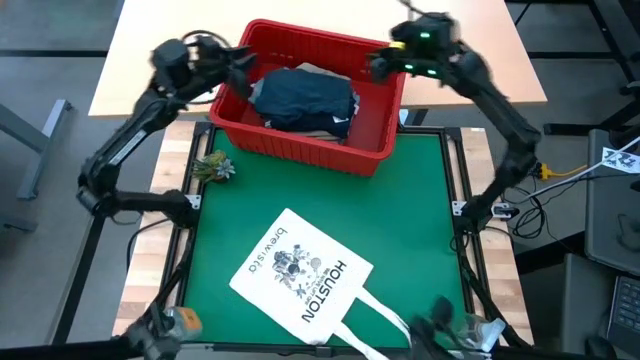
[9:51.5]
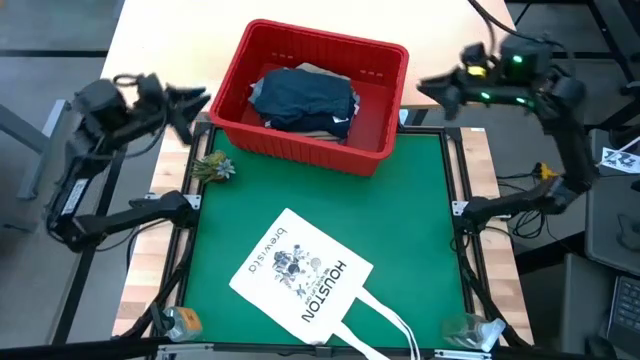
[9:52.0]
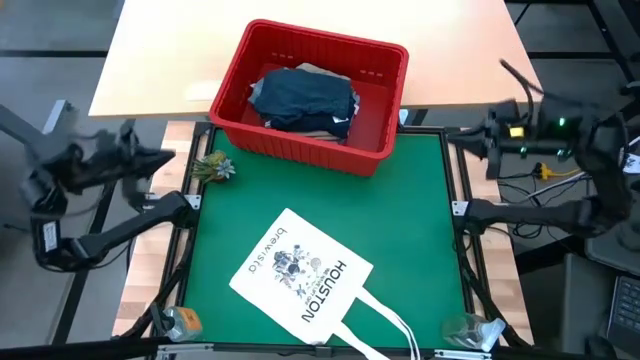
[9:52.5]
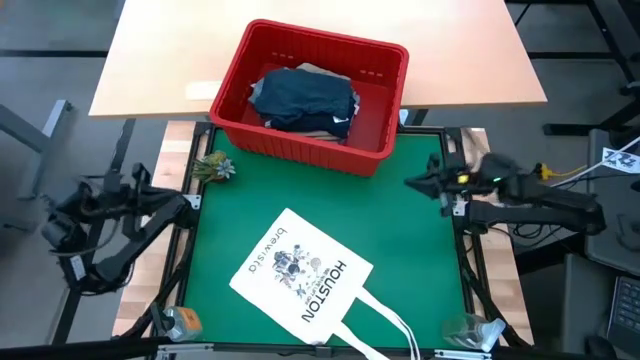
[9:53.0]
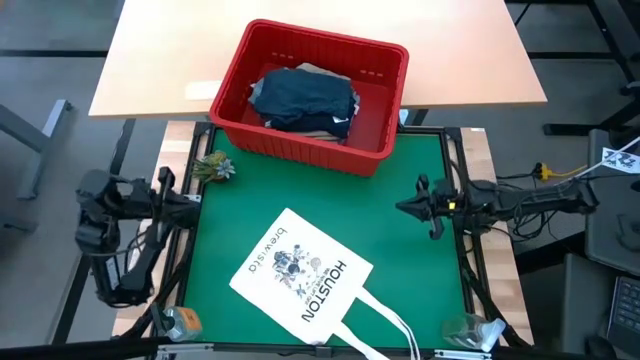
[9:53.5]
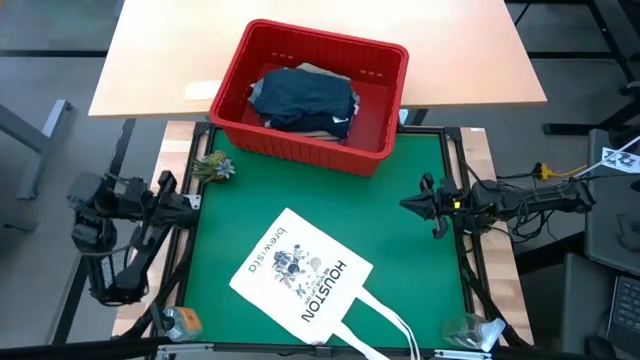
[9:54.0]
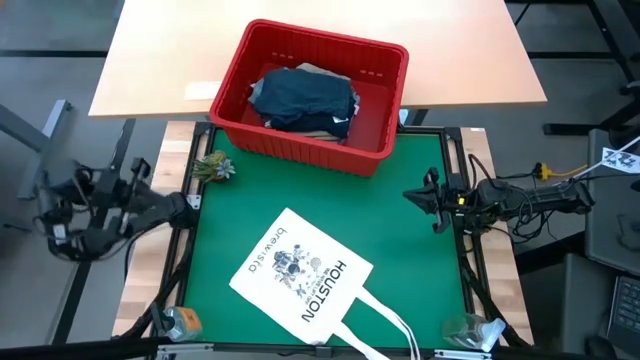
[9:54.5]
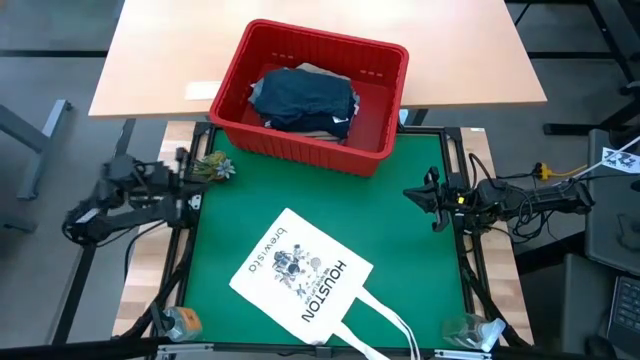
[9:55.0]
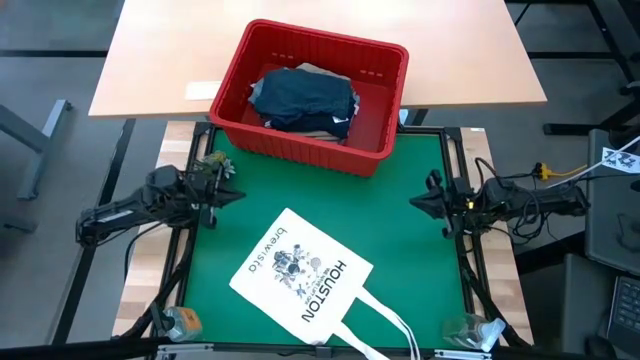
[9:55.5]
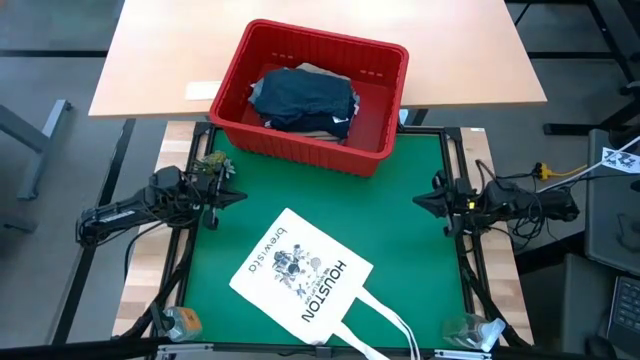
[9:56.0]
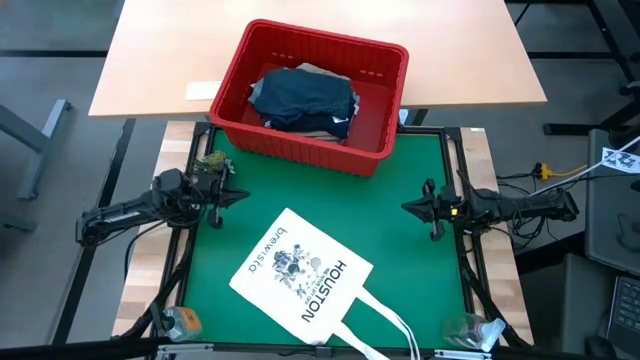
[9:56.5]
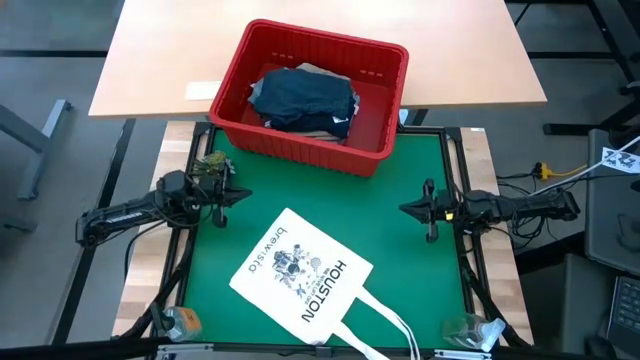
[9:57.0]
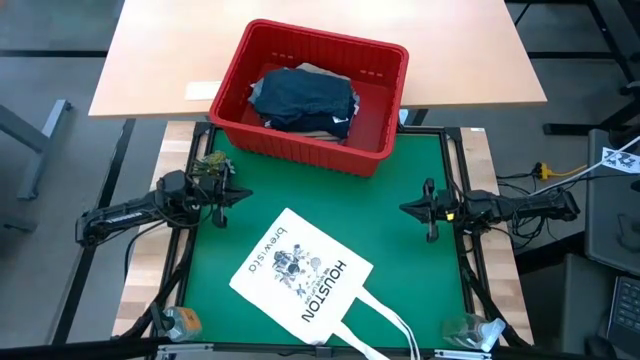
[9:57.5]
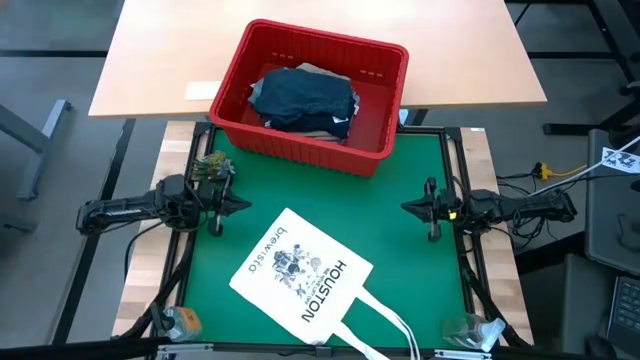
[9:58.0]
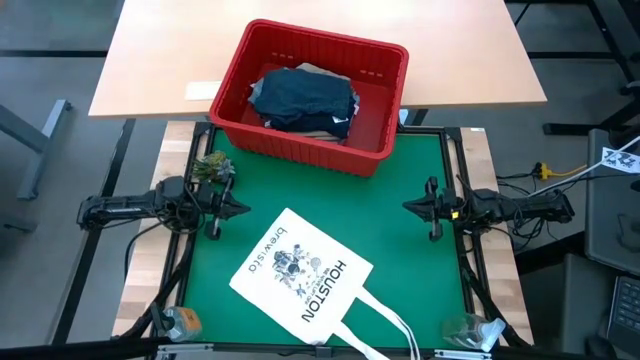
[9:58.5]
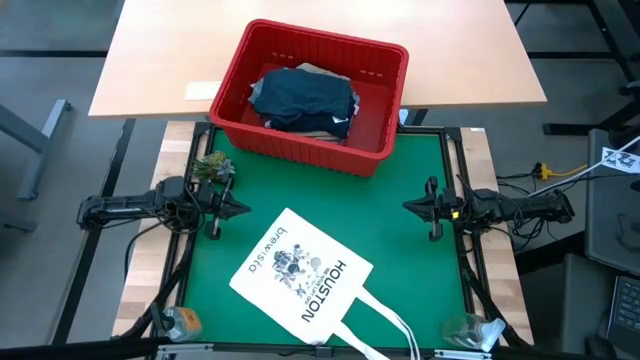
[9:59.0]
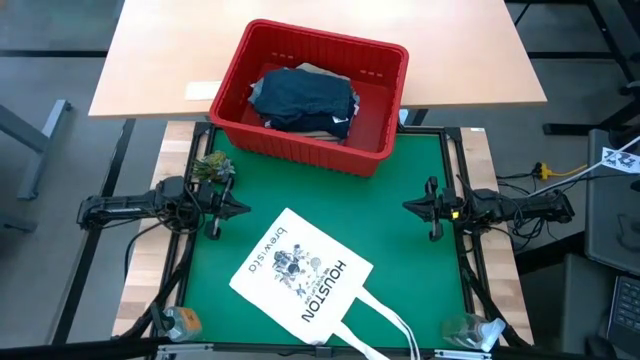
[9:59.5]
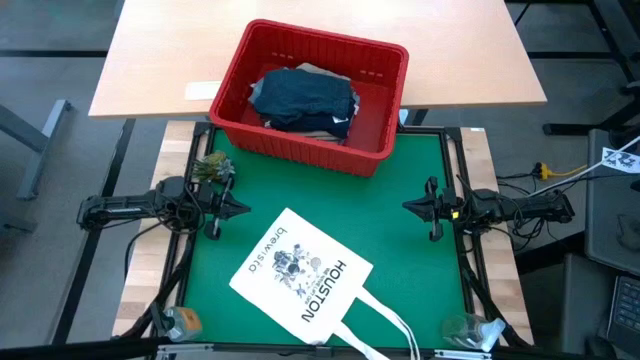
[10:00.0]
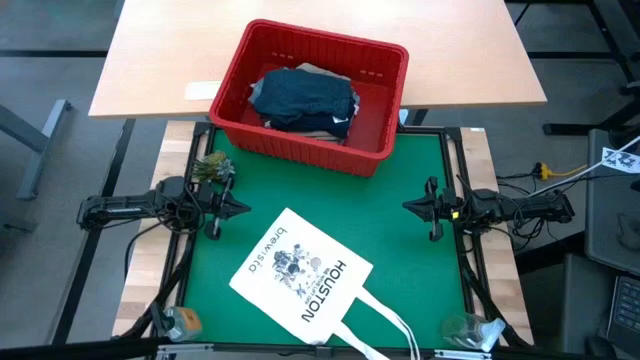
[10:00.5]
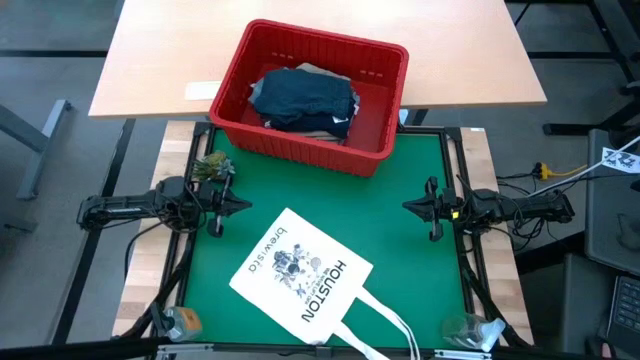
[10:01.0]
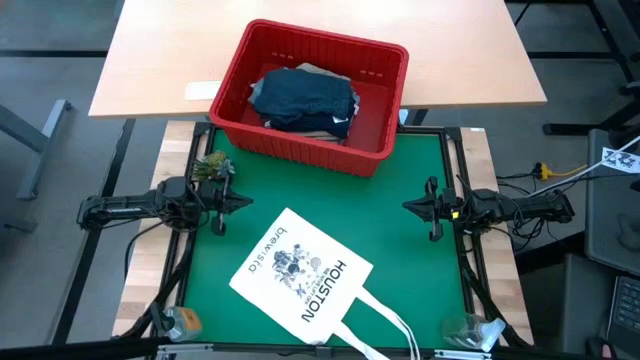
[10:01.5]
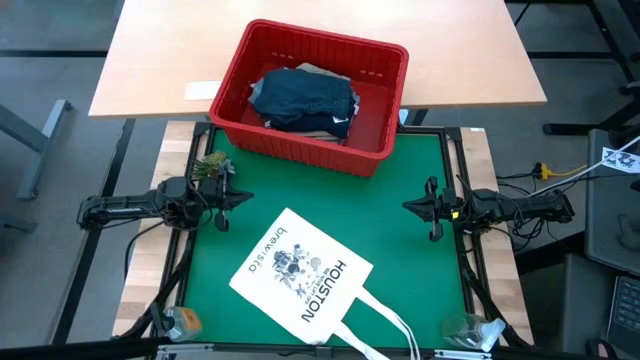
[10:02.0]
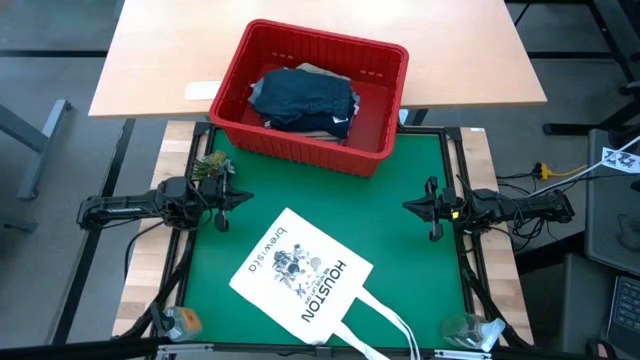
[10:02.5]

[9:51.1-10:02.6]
Task: Fold Laundry from Bin
Return to Home Position

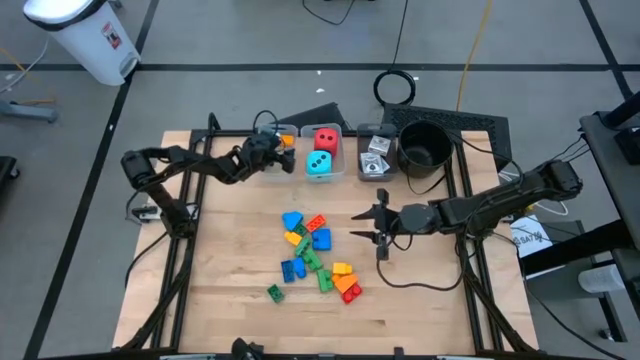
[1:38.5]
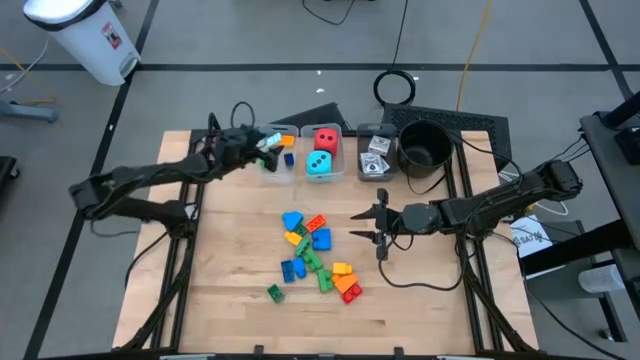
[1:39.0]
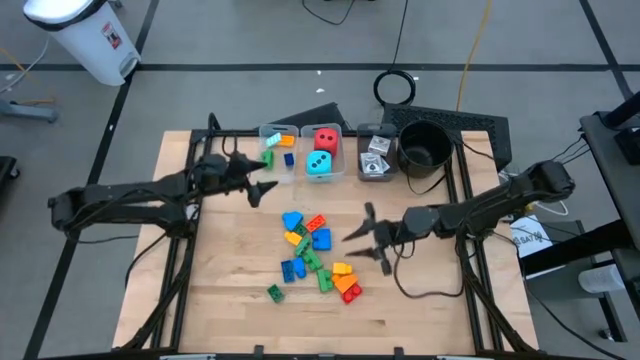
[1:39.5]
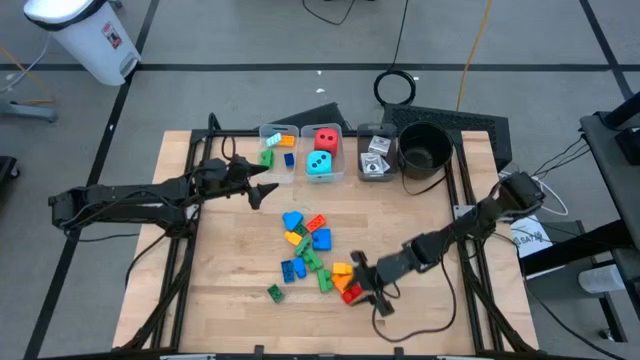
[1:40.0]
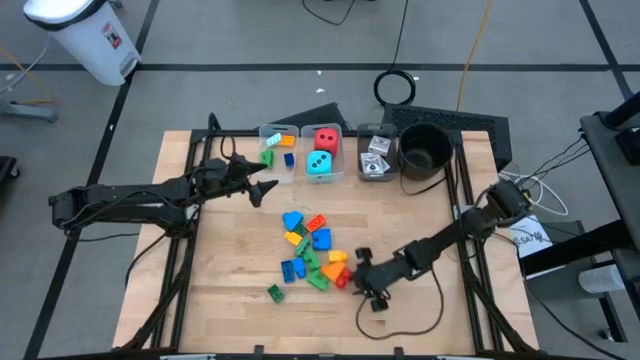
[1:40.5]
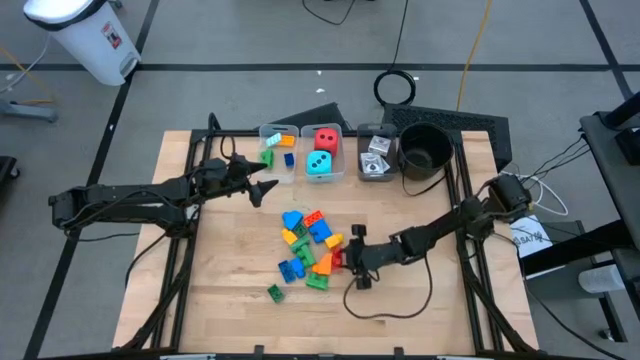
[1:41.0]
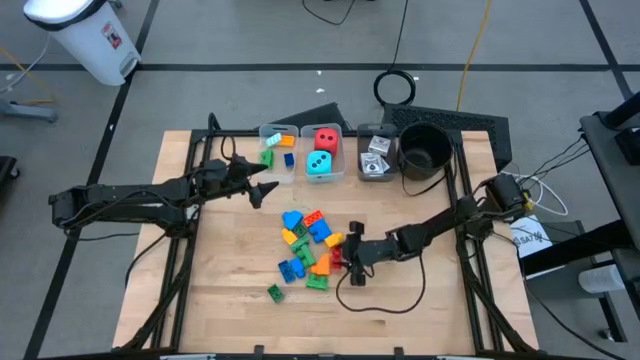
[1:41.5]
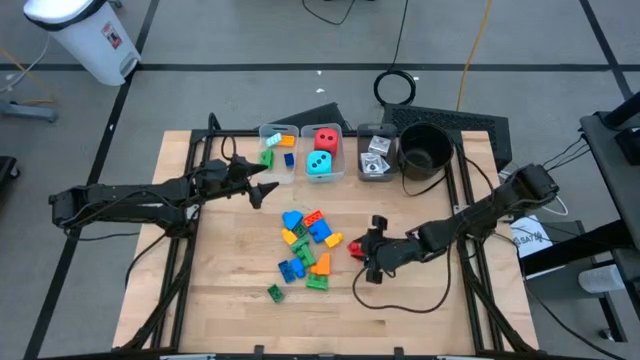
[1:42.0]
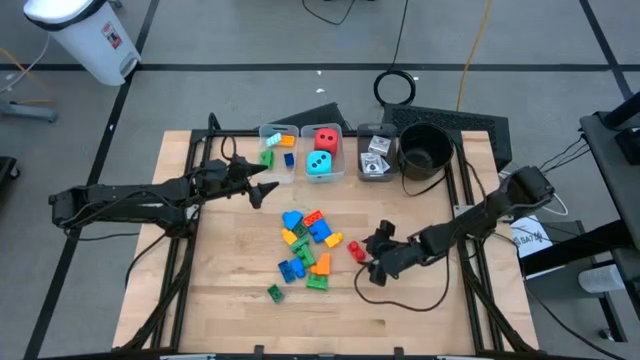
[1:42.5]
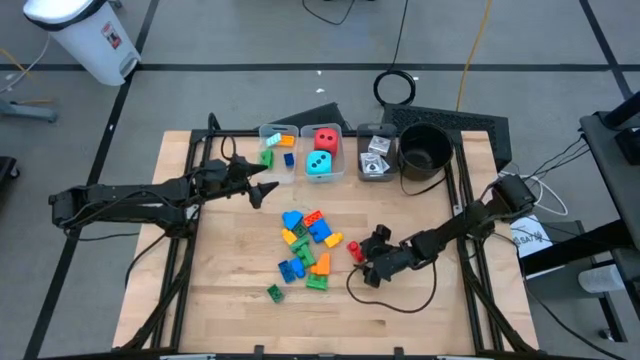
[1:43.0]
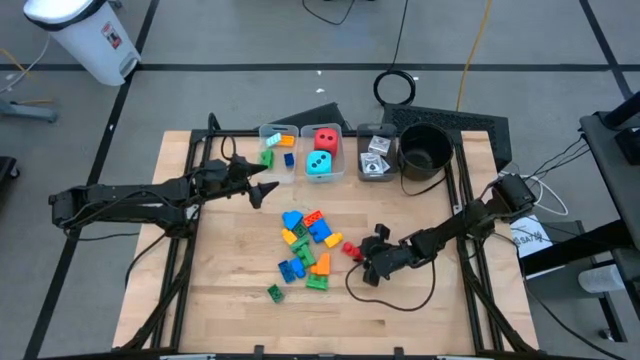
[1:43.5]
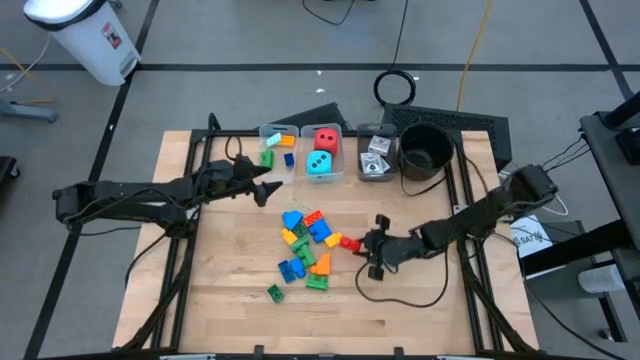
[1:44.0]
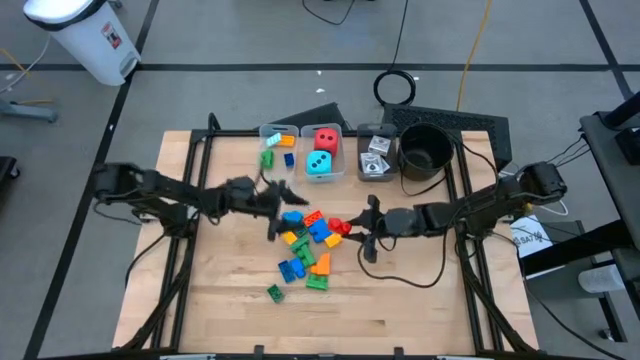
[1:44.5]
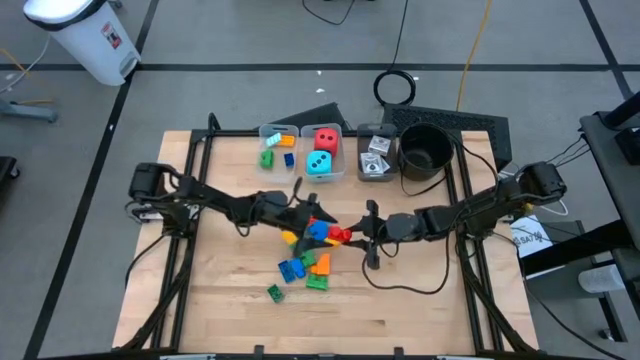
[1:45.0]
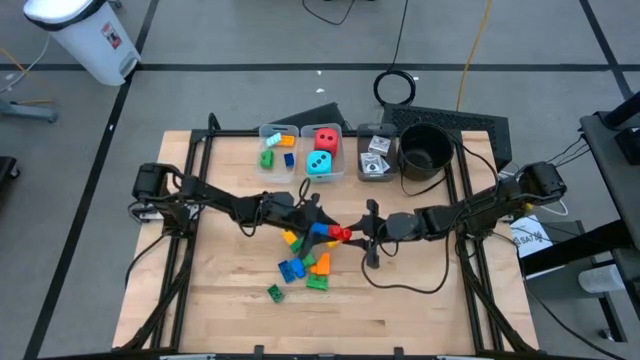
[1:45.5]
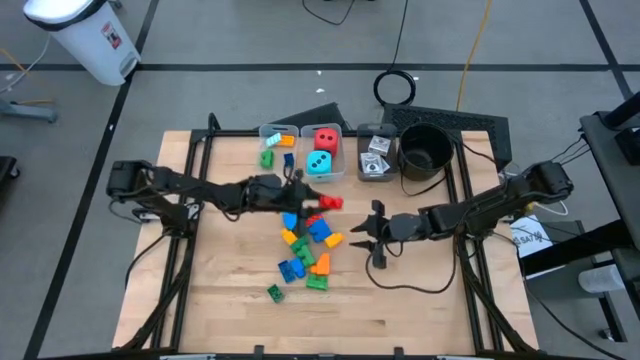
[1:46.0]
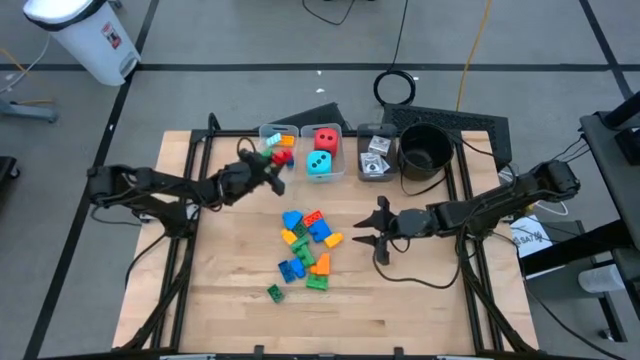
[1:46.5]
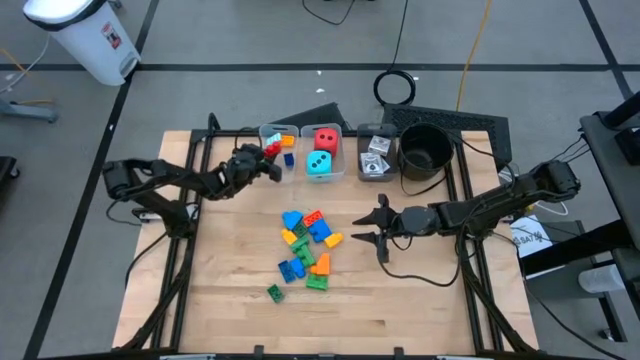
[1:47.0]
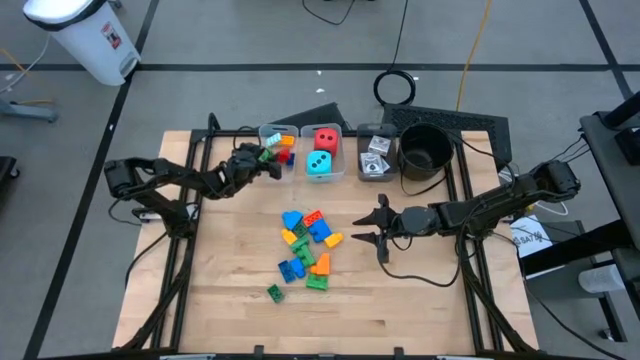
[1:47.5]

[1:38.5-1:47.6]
Task: Pick & Place Toys
Put the red game piece into the left transparent bin
